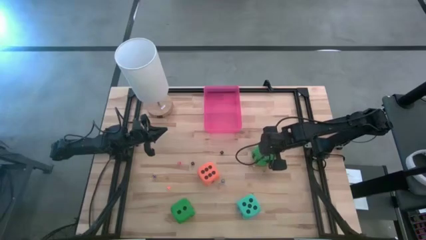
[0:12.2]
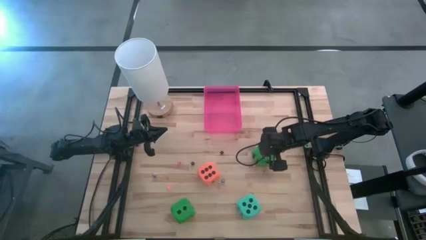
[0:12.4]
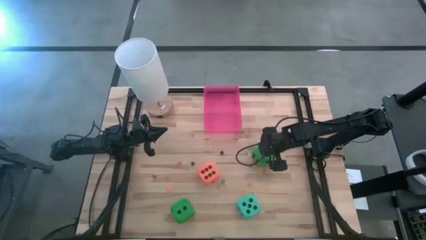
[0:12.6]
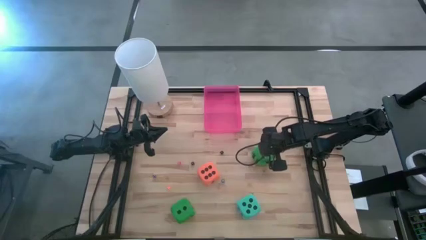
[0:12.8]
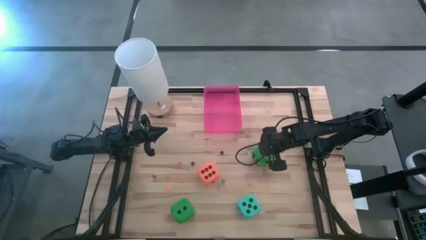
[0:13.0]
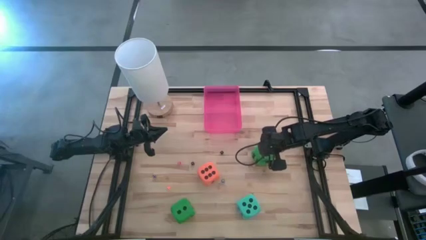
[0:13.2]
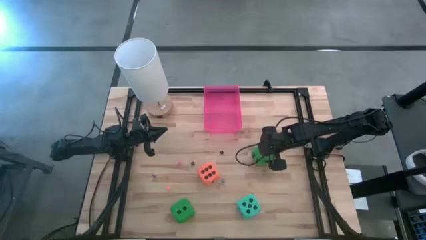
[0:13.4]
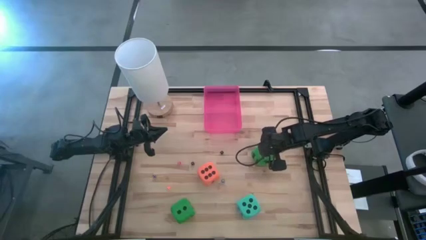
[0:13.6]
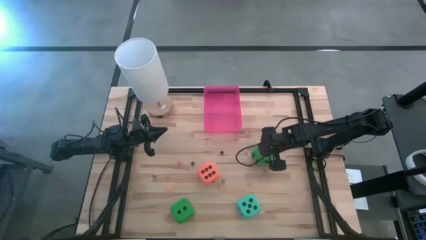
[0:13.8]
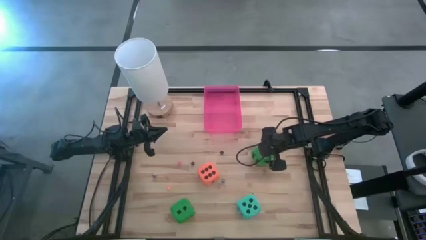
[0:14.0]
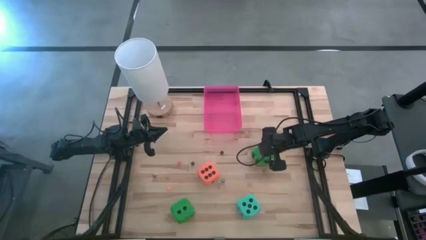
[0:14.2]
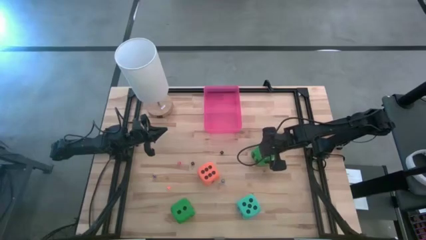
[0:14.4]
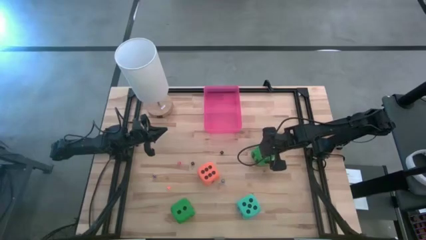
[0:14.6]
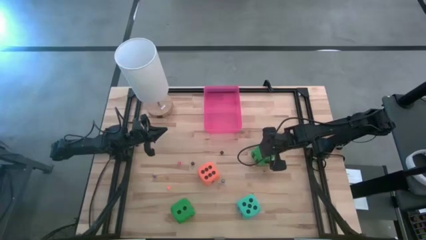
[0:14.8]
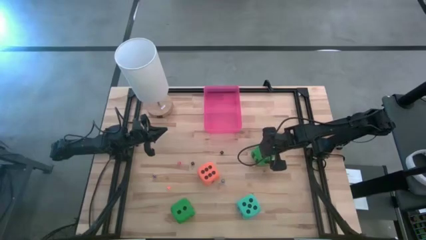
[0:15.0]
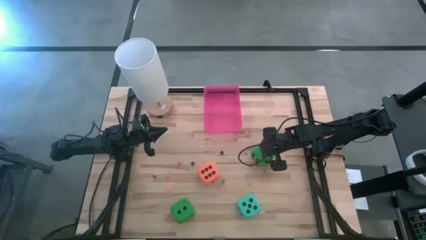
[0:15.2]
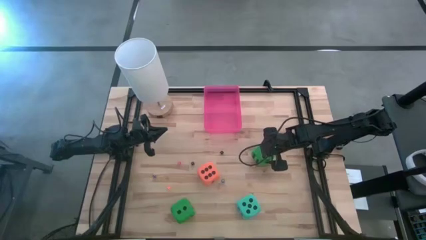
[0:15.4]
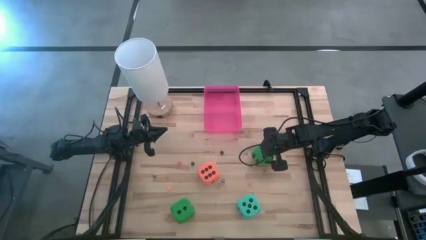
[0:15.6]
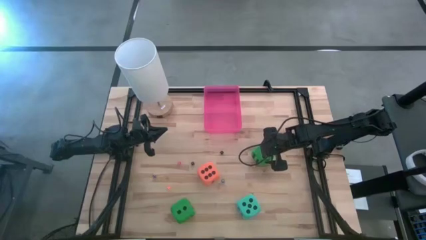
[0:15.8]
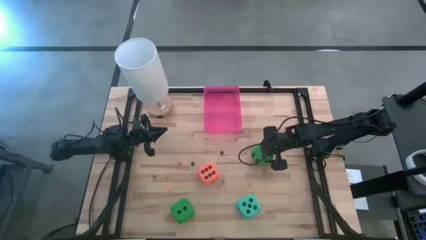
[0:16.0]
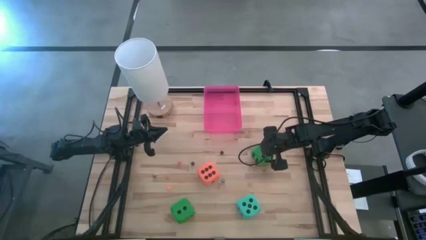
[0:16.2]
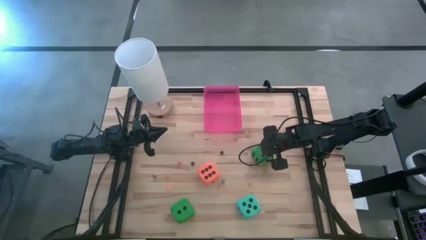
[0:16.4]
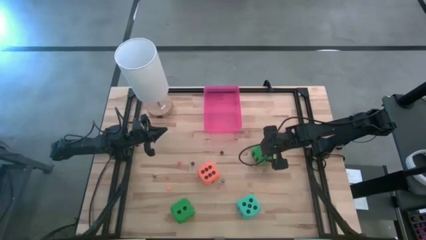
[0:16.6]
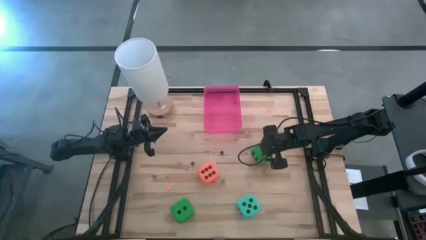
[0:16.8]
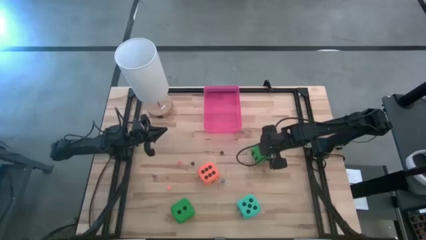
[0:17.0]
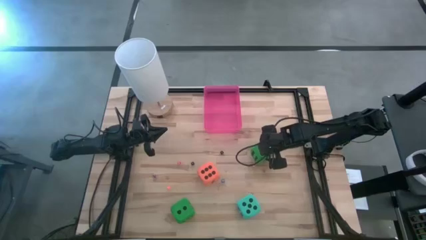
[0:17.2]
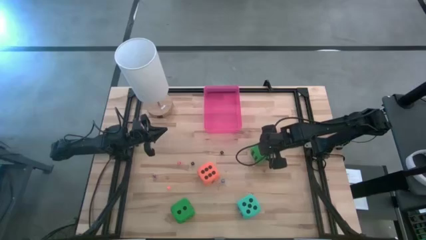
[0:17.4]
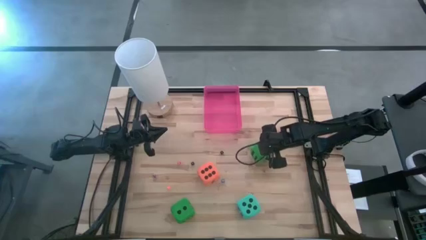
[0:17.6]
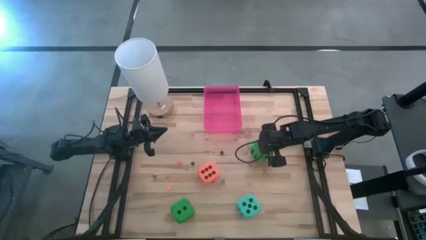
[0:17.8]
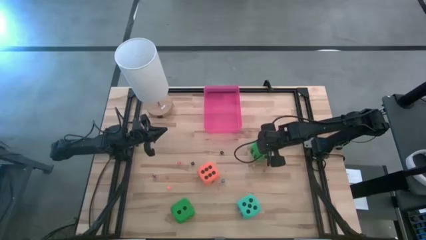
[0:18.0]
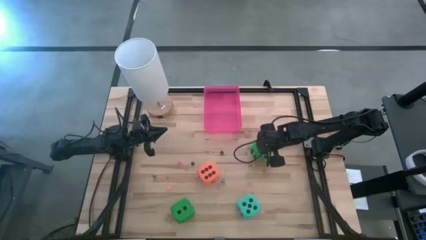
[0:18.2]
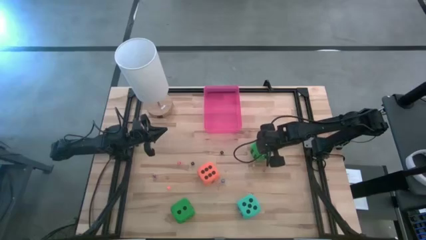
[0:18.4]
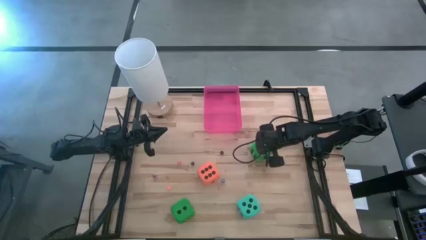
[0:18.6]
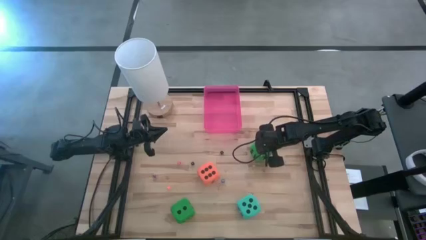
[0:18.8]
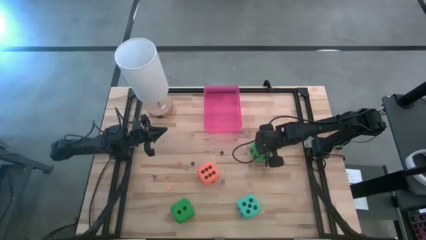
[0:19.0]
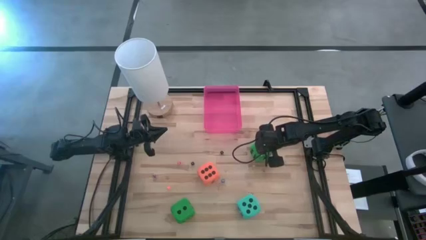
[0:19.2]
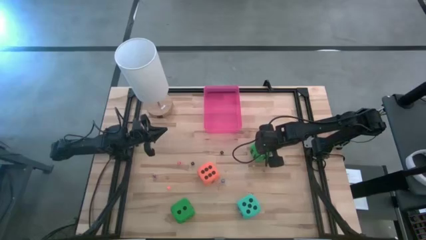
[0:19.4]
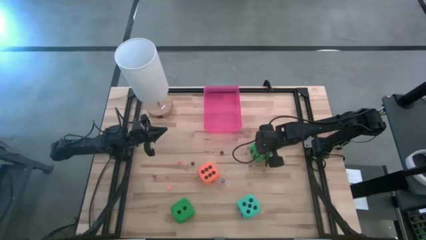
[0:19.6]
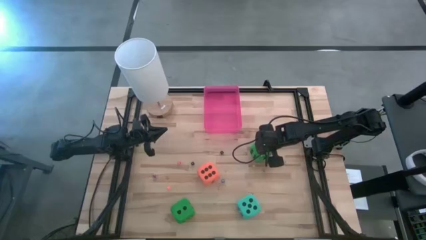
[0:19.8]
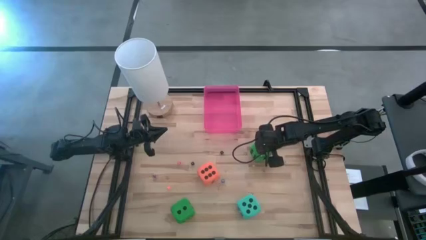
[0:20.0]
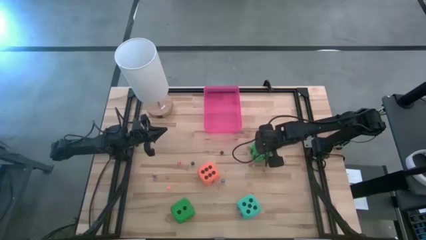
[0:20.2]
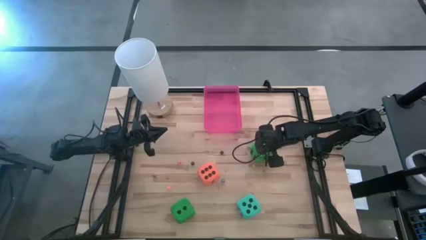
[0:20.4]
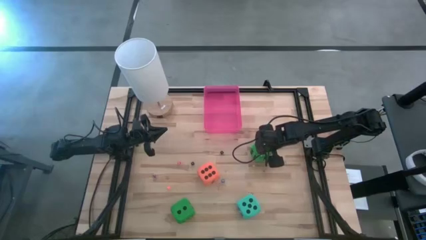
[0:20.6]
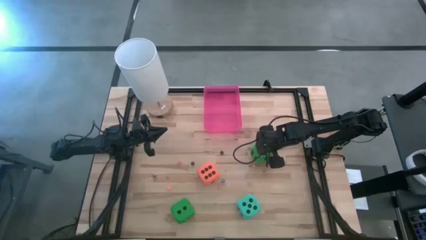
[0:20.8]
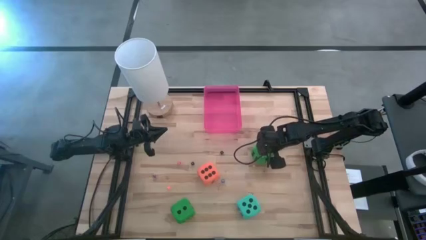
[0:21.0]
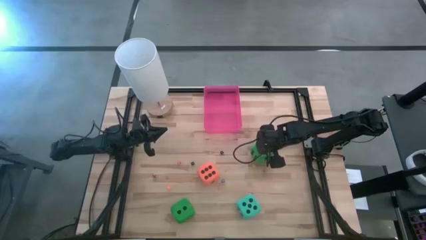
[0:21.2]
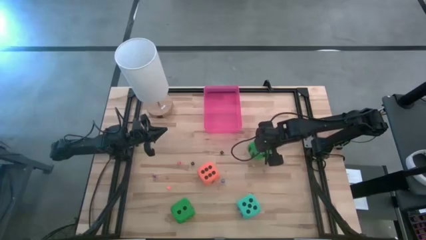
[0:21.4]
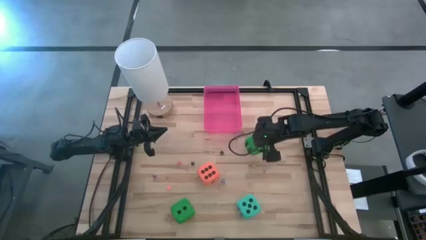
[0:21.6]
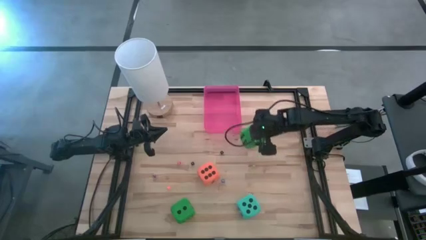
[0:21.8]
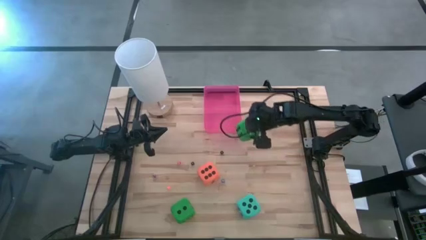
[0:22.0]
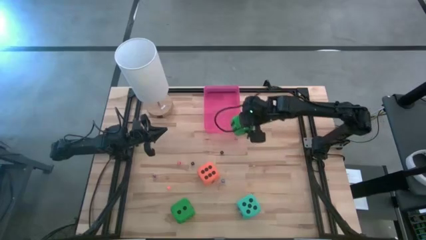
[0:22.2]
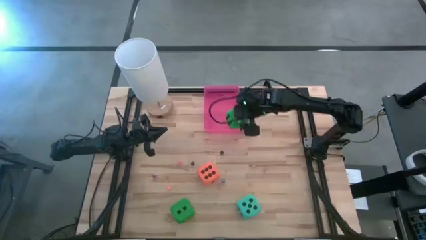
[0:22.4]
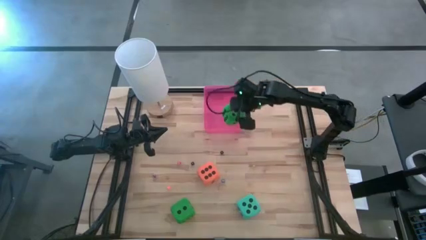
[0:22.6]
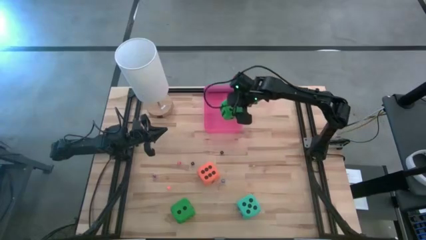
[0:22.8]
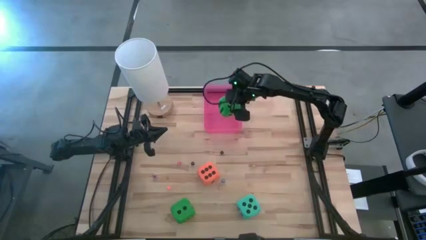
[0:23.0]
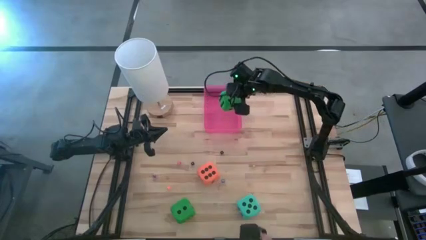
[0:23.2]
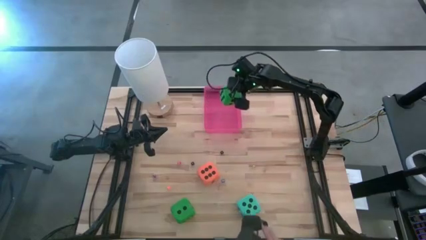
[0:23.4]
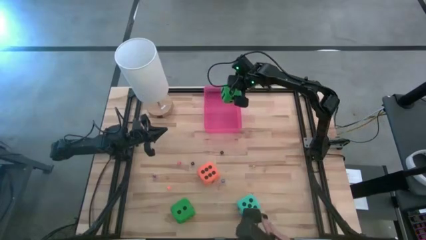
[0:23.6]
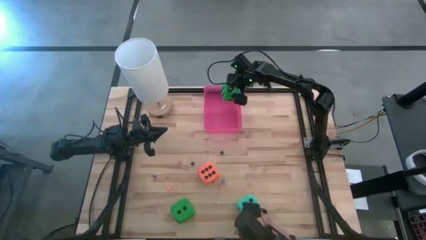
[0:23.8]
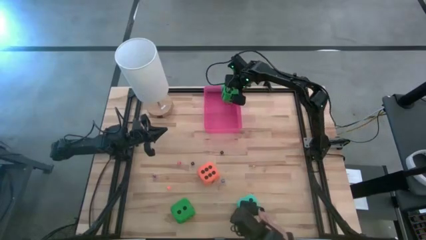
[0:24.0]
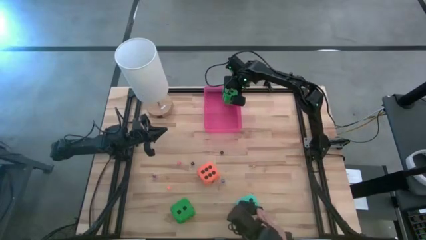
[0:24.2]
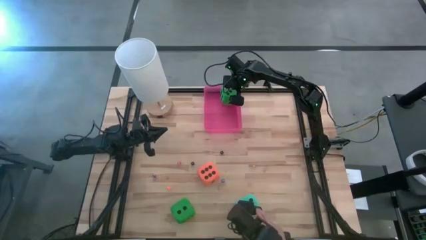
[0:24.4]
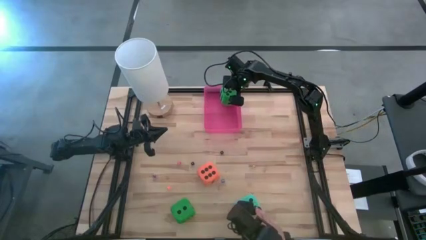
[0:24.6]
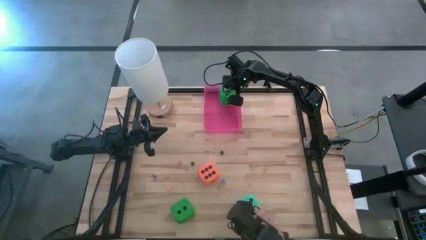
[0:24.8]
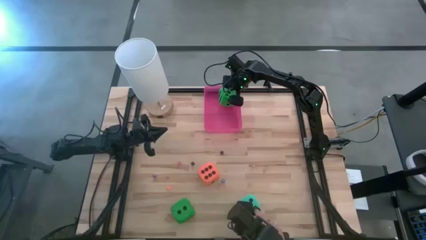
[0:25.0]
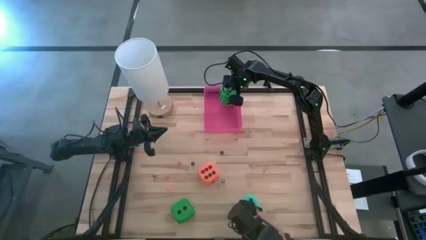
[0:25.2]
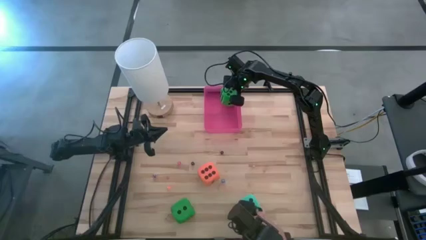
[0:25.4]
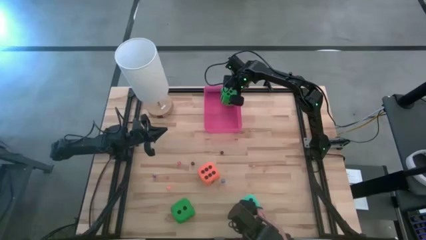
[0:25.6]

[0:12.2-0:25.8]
Task: Pick & Place Dice
Put the right big green dice into the red container
